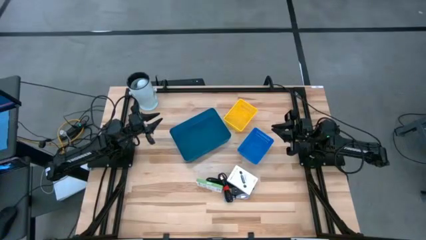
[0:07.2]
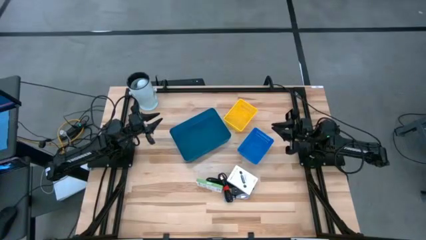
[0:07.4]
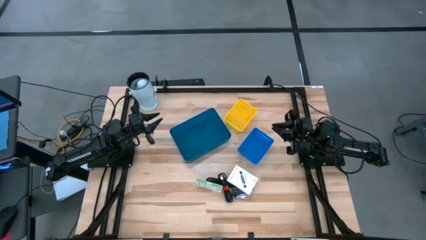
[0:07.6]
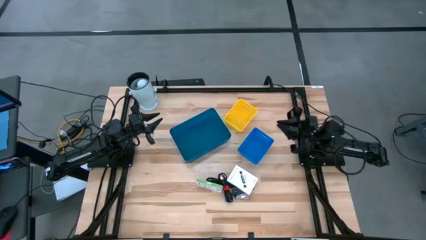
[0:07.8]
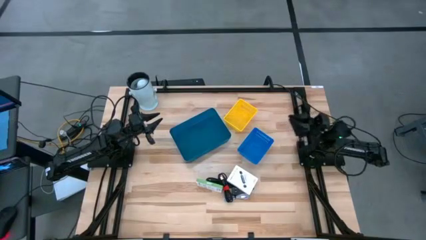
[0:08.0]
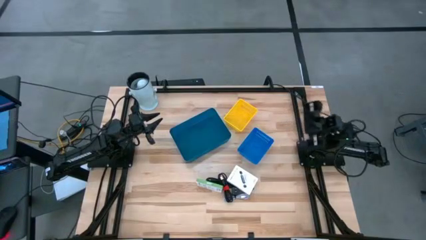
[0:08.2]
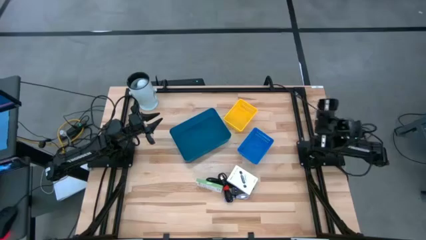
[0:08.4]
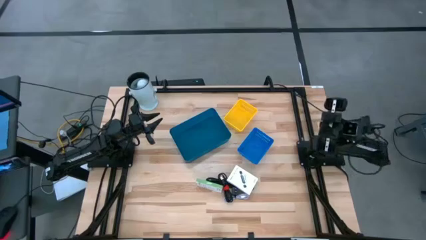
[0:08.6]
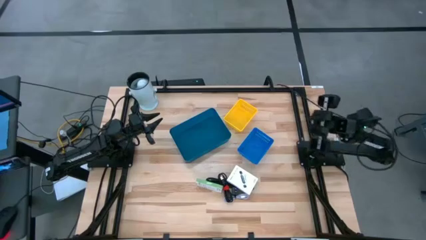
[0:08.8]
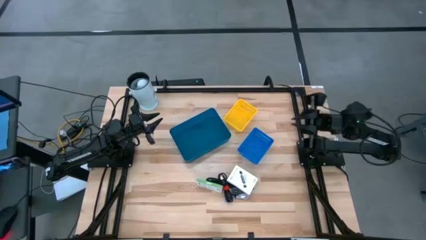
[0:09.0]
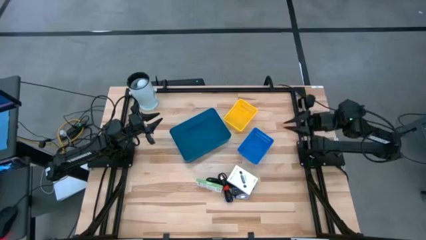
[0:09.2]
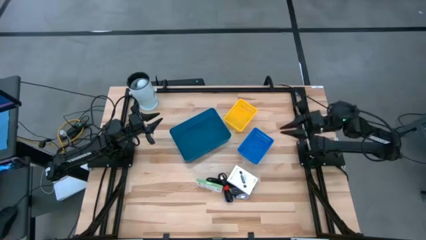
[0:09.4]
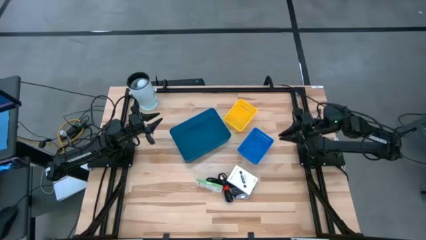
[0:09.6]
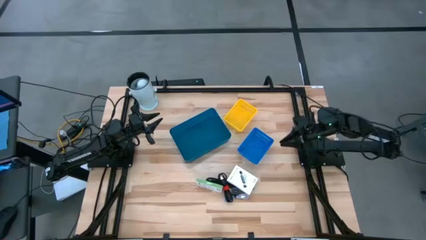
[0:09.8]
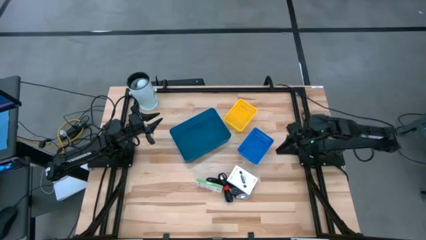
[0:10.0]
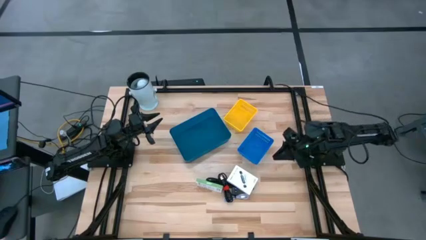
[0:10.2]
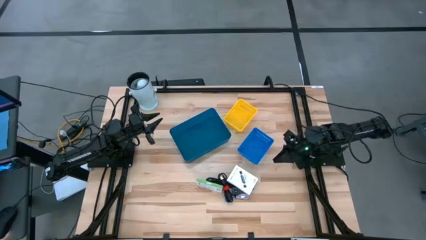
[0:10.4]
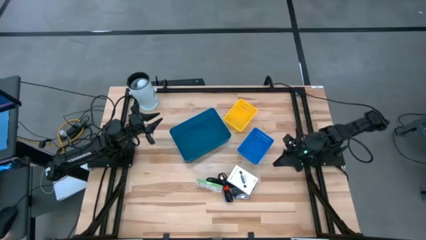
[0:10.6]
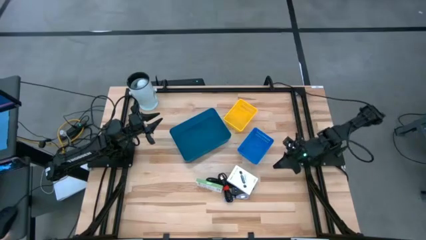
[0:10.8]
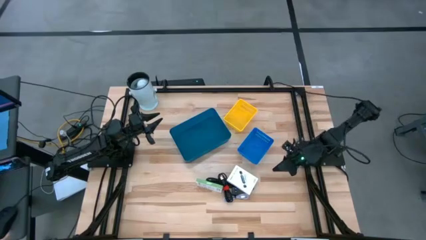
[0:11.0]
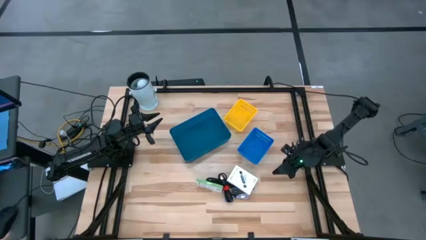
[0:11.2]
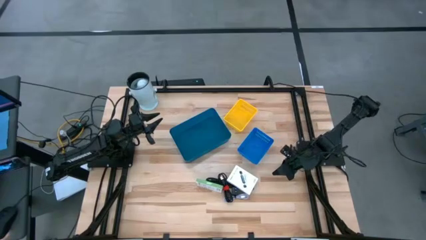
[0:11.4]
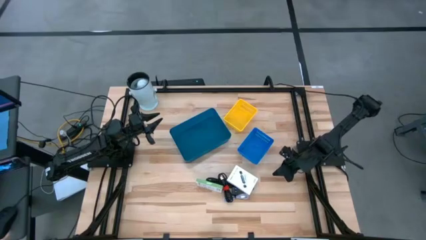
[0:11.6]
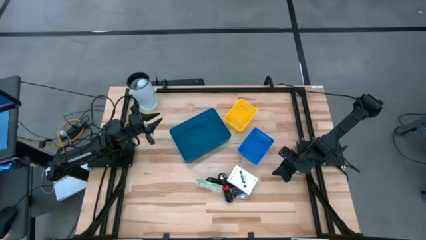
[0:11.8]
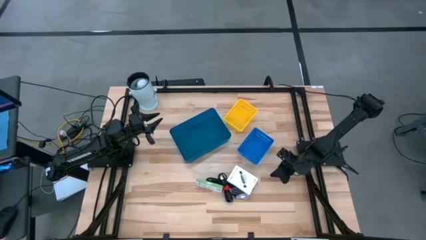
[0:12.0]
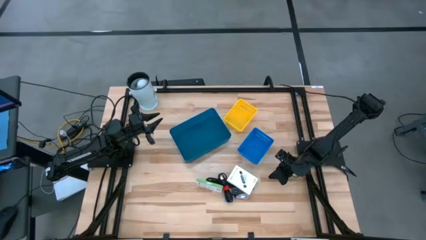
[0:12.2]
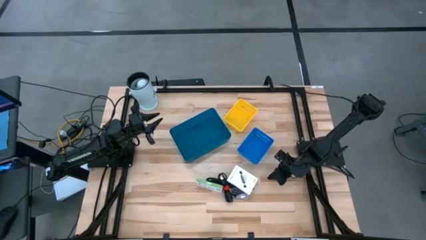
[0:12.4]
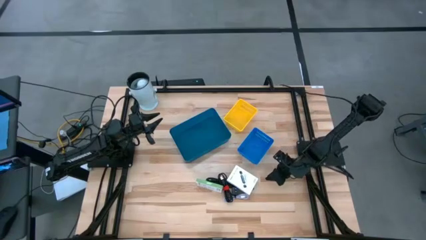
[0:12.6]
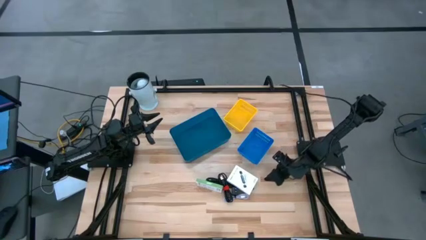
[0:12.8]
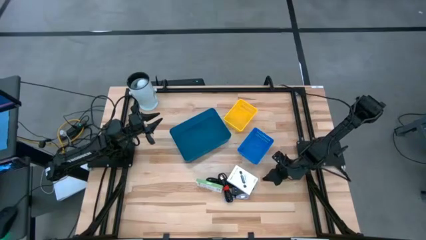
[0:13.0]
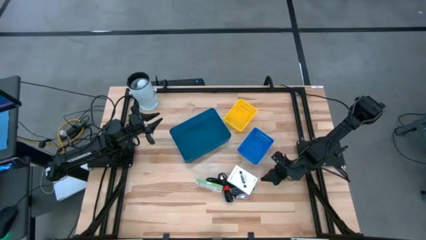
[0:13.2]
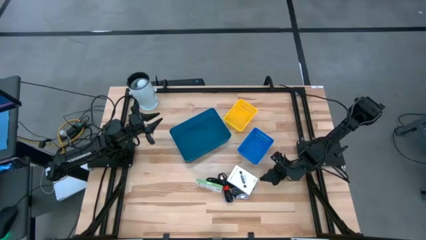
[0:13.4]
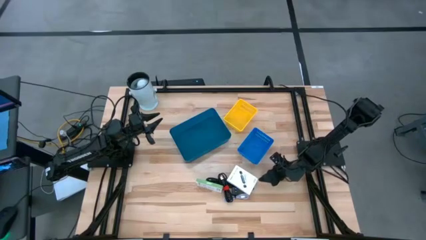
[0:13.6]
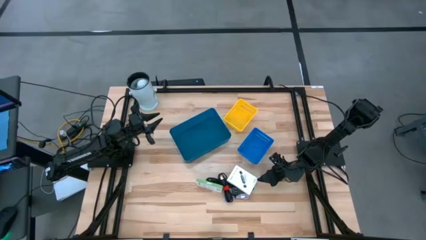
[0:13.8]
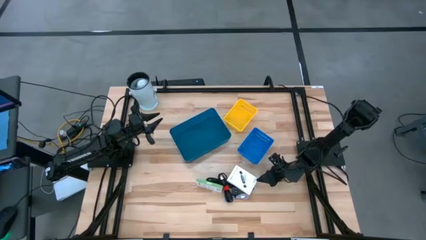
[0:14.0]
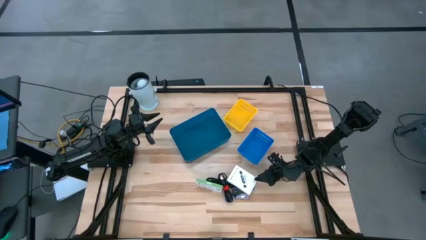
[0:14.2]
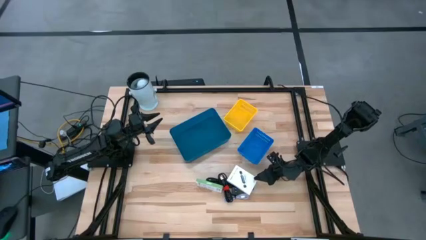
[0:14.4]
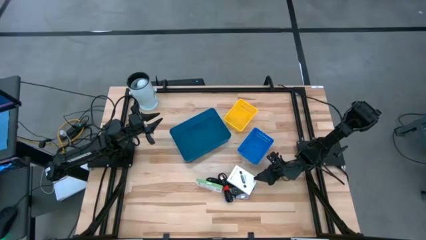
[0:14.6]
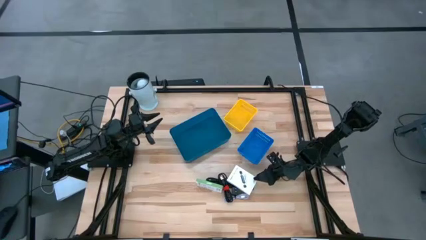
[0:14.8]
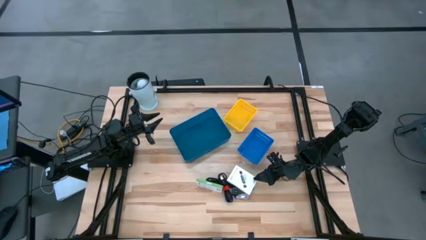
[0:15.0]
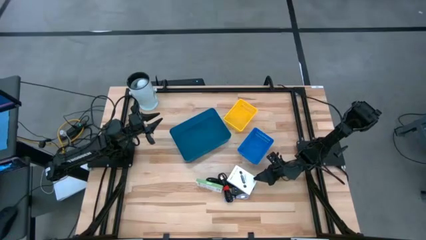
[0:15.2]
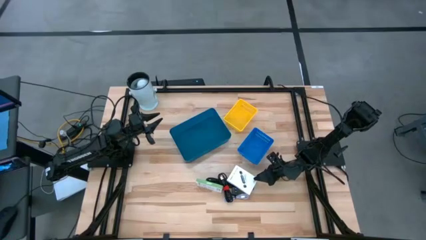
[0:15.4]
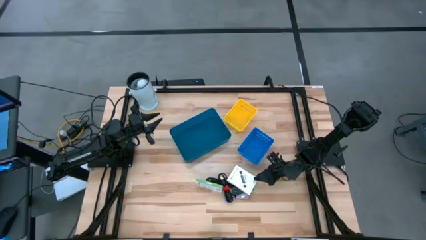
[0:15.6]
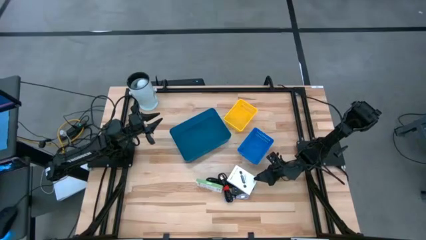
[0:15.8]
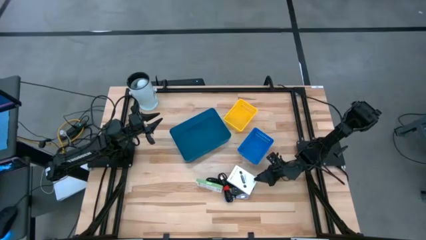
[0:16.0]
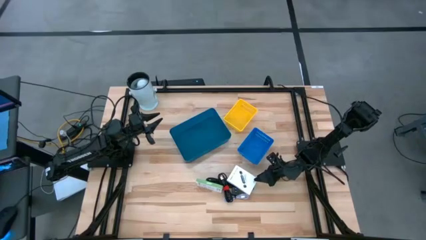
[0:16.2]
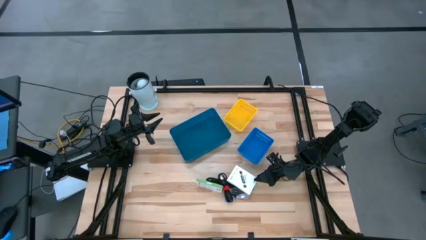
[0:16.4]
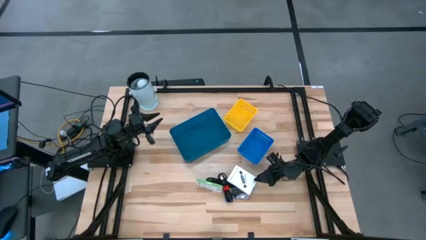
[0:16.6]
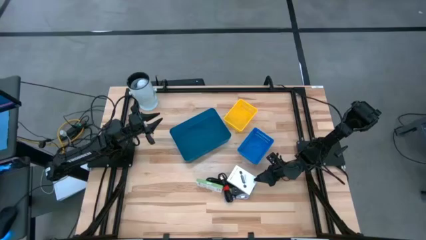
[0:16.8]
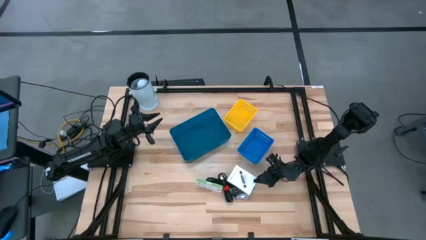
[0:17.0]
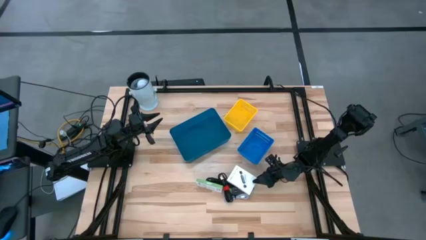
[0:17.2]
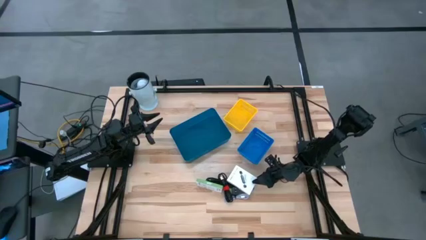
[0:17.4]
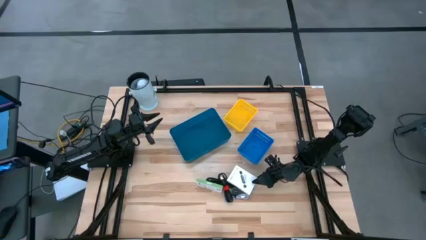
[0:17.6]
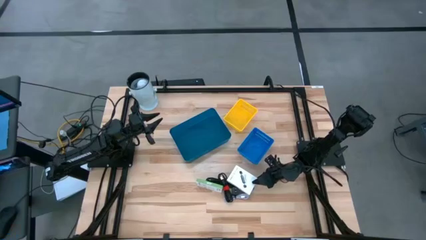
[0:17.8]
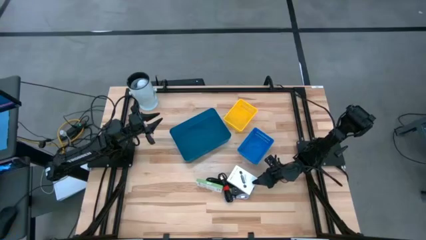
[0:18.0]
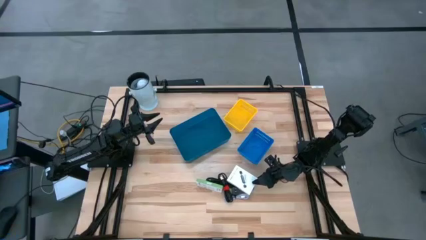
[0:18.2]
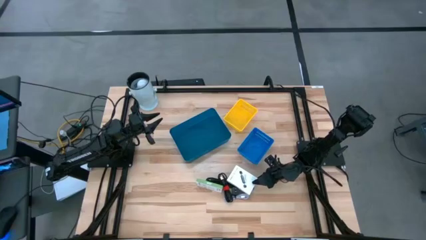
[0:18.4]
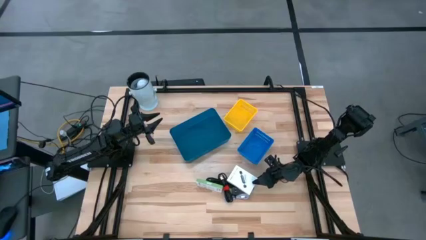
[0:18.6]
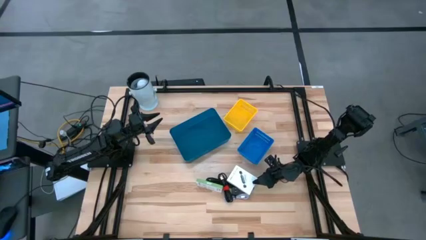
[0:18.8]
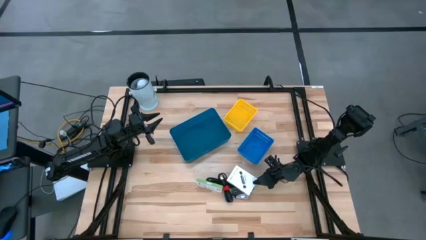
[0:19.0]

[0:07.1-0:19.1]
Task: Pick and place items into bin
Put the right card reader box into the yellow bin
